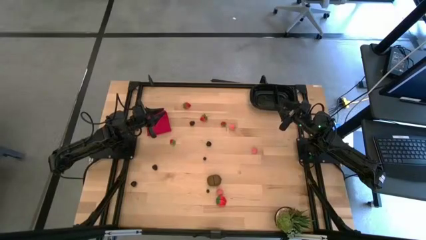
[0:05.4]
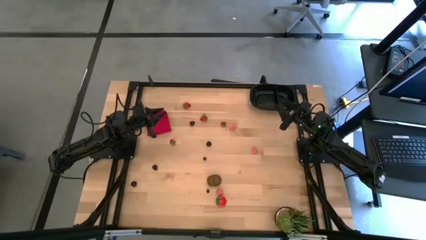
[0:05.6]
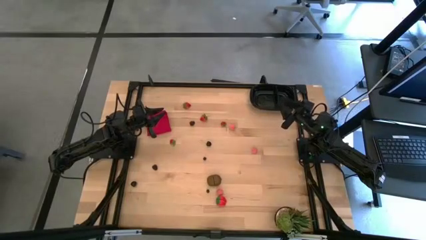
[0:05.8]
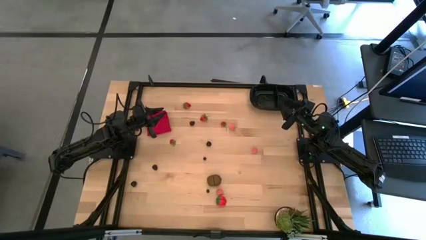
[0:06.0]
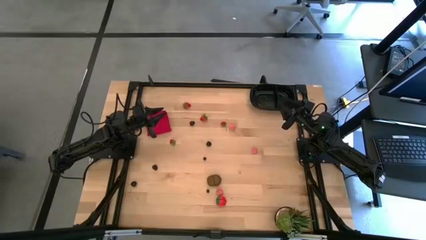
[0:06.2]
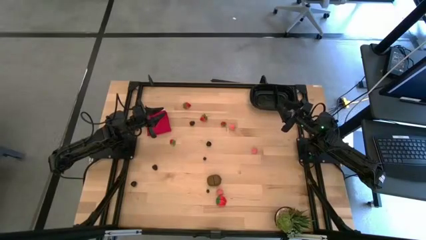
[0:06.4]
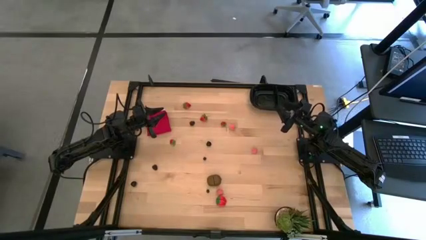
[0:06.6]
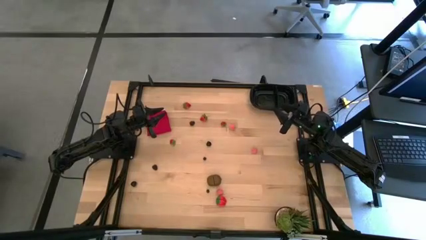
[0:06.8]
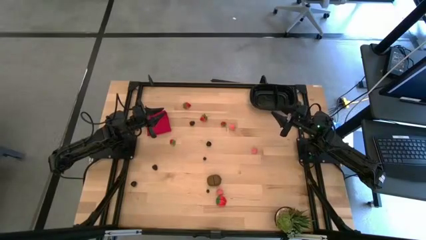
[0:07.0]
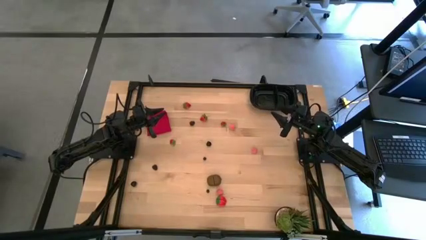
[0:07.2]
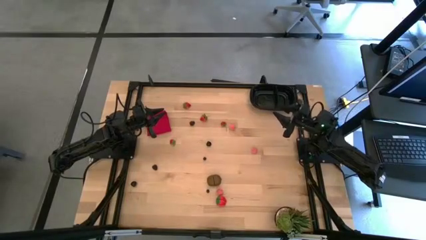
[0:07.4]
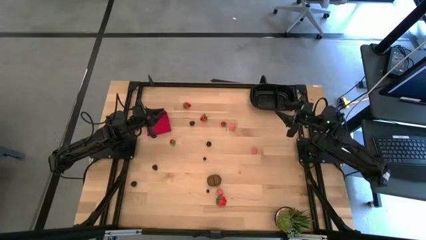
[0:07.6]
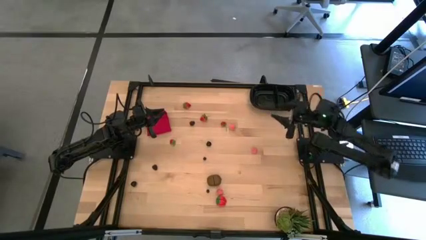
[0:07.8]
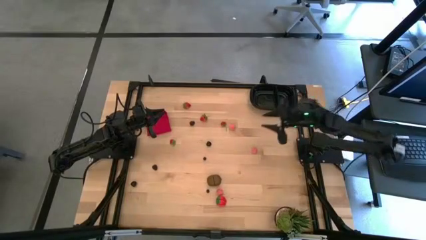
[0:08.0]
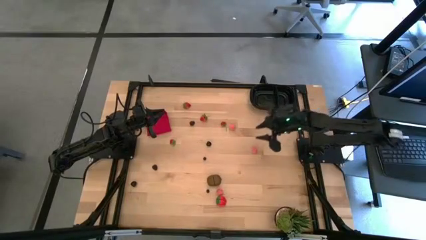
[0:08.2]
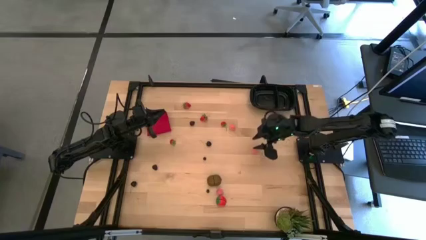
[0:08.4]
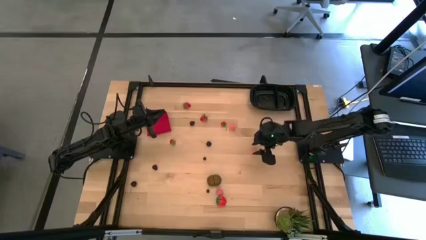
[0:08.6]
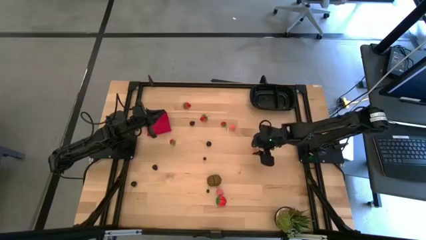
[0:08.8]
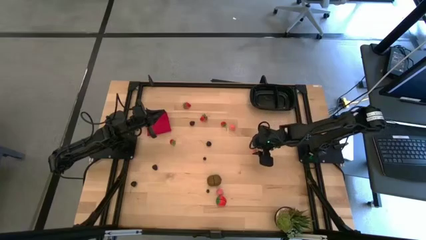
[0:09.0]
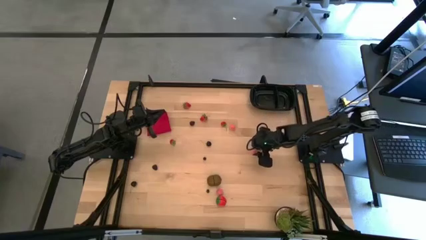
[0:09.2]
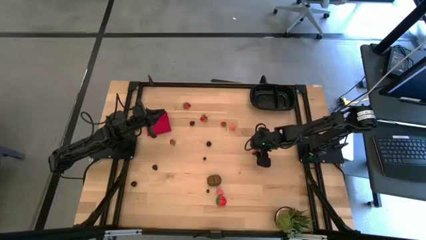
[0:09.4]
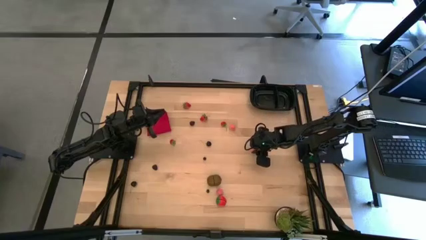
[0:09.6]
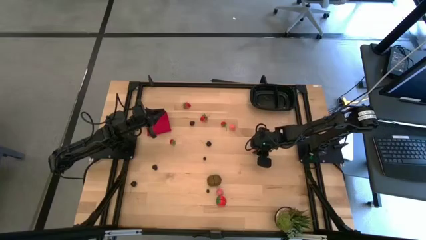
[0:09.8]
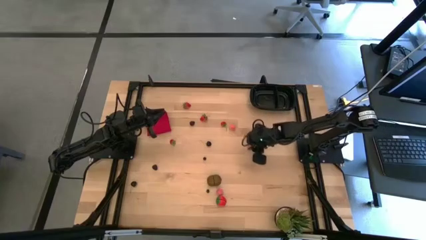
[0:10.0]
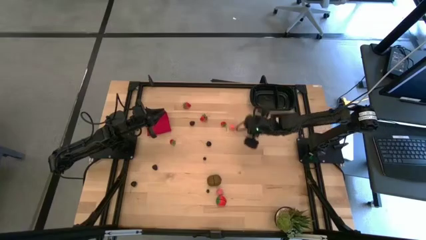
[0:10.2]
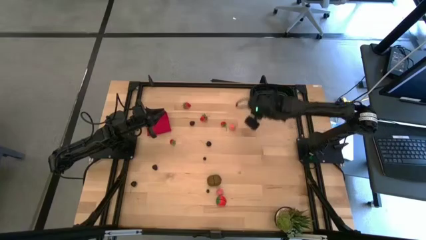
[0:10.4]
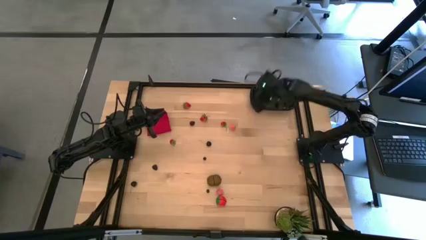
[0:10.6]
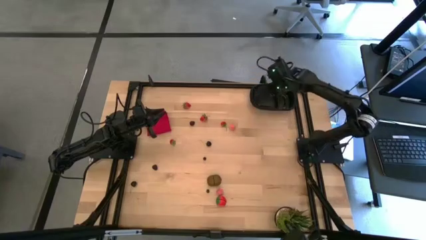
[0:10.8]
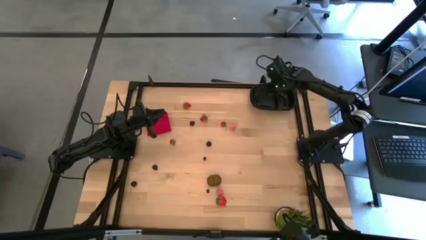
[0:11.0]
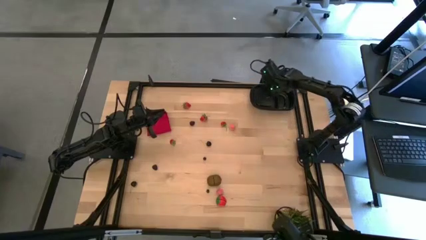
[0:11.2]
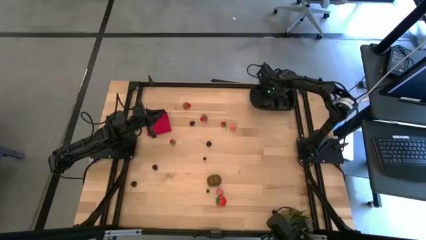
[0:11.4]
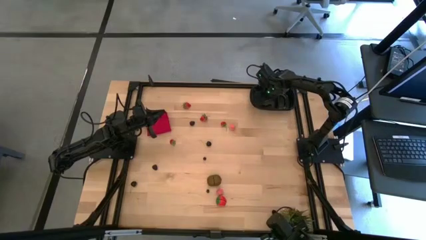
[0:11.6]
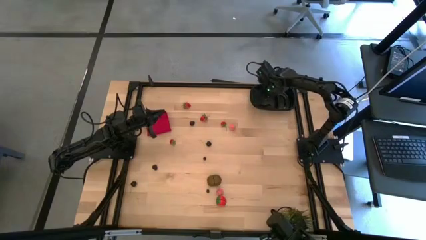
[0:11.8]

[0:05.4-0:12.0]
Task: Pick and placing Produce into tupperware
Put the bottom pink peach into the black bin

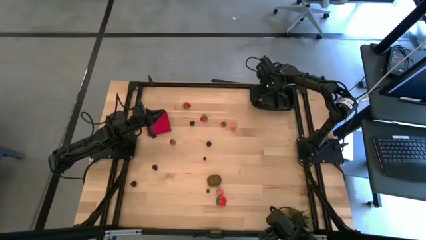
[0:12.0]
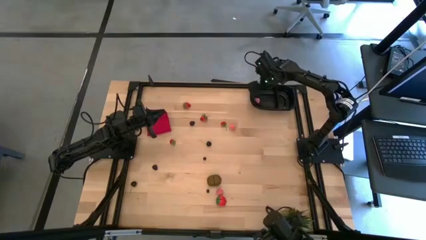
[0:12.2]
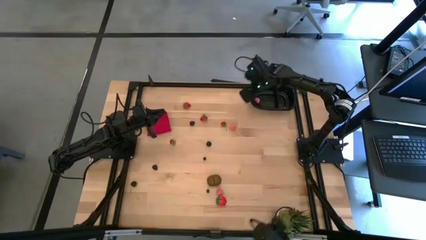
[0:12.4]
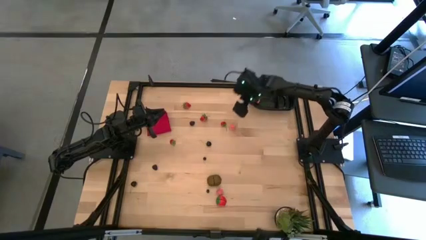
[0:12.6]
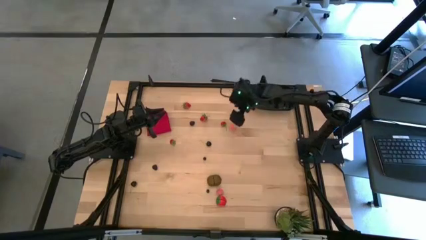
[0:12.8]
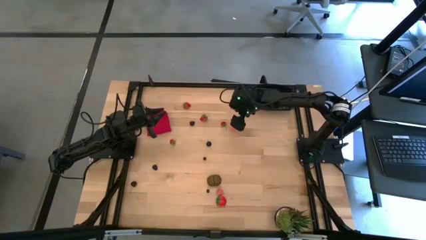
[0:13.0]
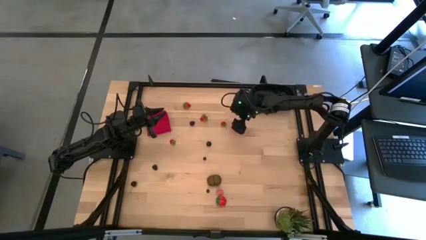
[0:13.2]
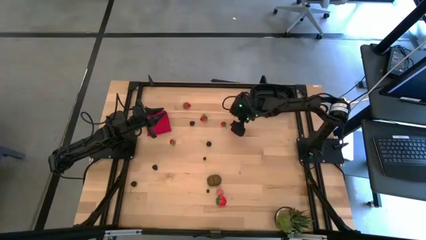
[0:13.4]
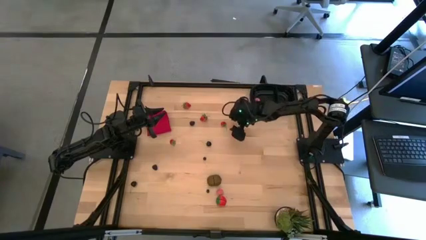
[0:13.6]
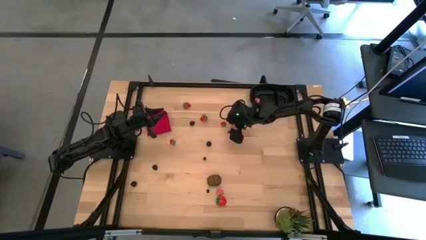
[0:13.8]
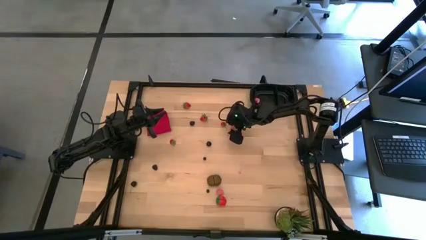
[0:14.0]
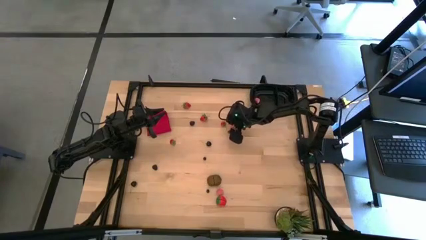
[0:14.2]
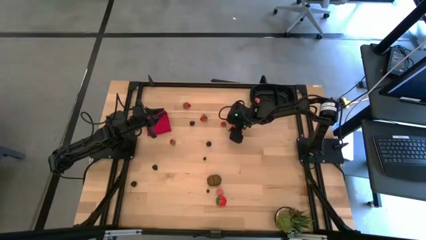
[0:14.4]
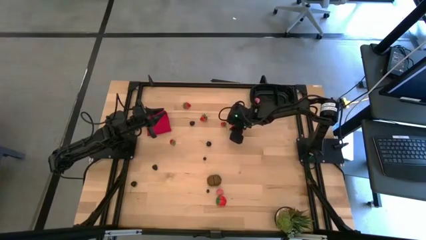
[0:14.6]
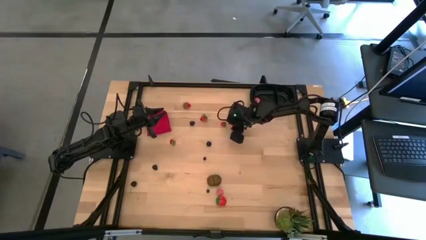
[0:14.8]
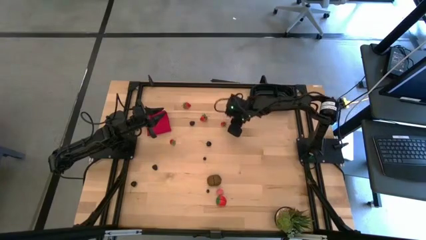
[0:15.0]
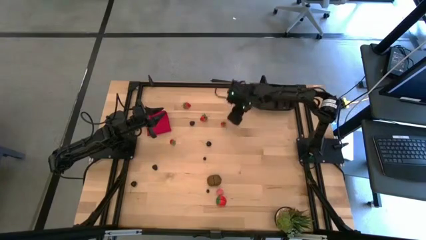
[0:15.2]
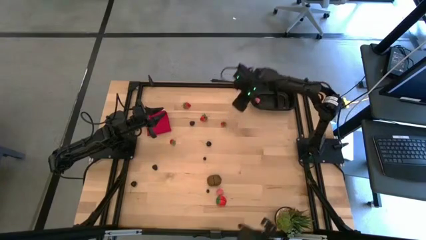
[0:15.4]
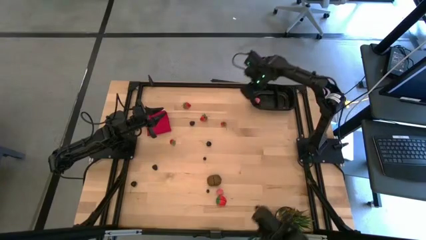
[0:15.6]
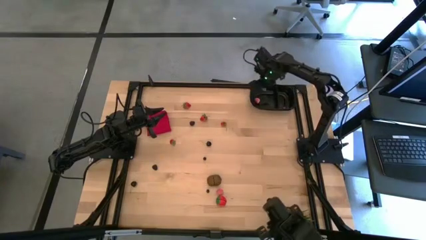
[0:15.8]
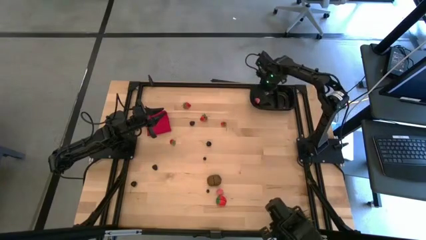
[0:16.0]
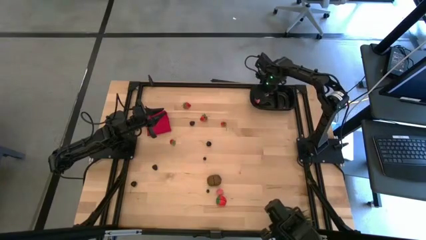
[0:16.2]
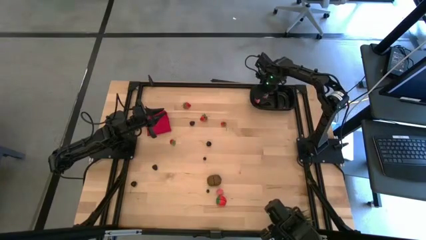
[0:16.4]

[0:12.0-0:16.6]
Put the top pink peach into the black bin

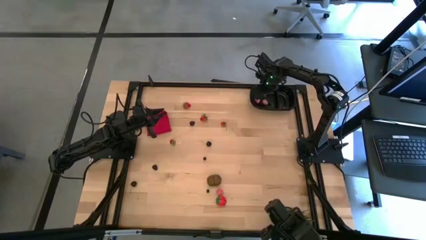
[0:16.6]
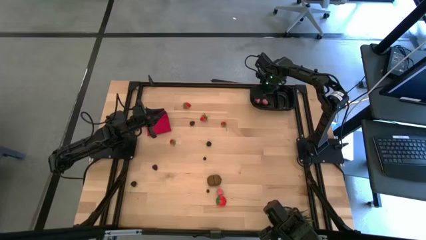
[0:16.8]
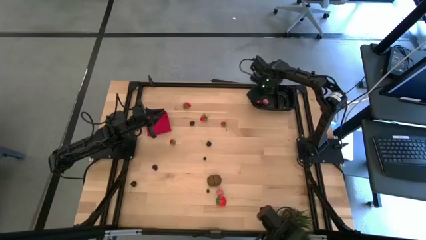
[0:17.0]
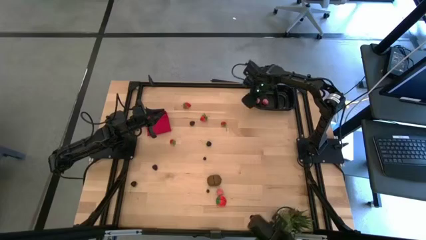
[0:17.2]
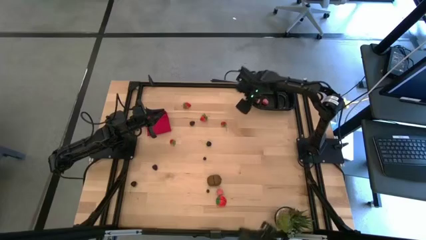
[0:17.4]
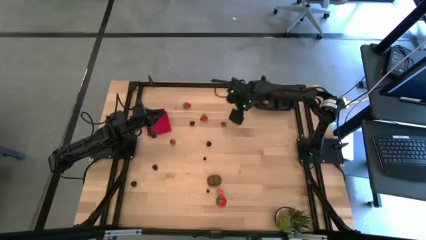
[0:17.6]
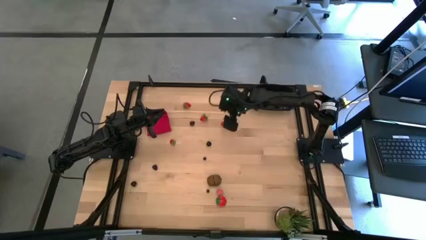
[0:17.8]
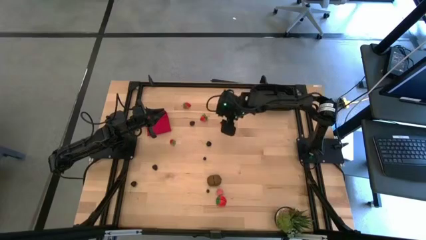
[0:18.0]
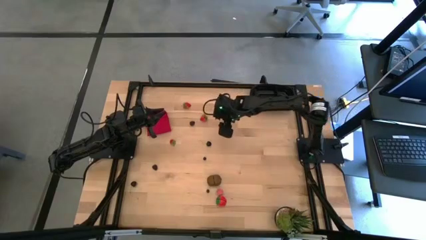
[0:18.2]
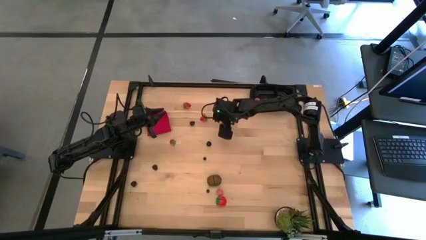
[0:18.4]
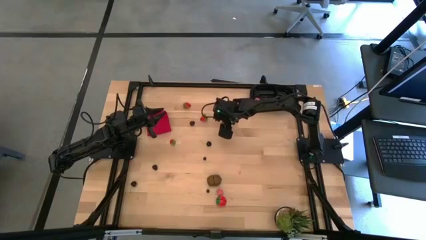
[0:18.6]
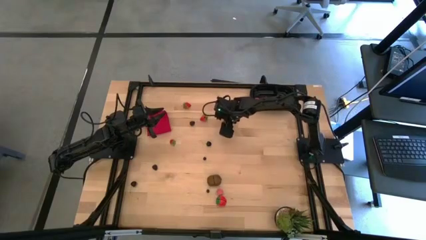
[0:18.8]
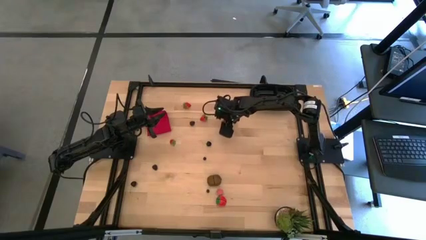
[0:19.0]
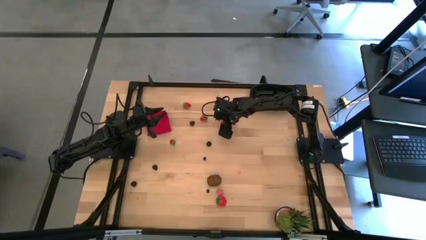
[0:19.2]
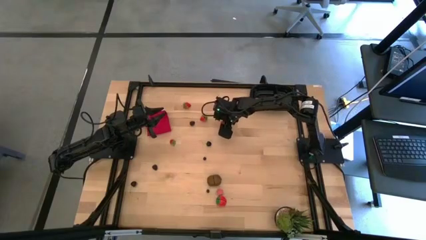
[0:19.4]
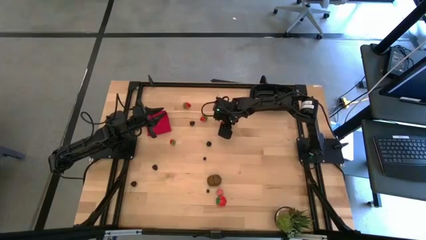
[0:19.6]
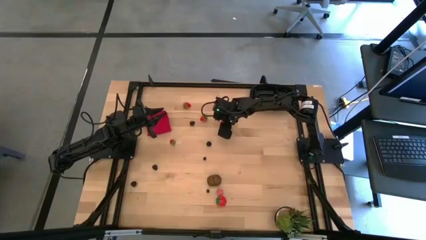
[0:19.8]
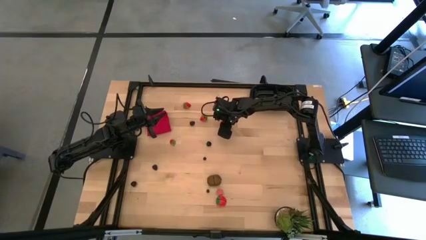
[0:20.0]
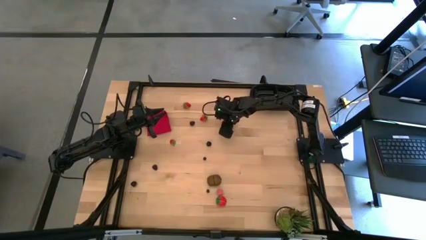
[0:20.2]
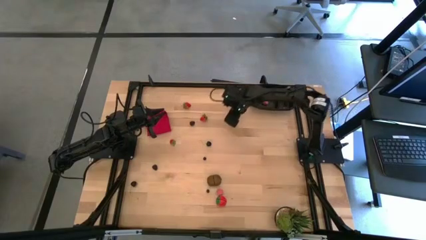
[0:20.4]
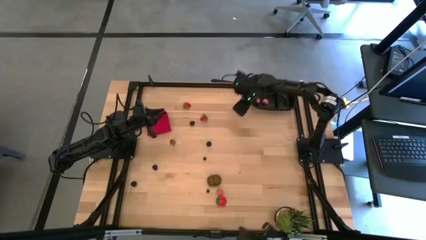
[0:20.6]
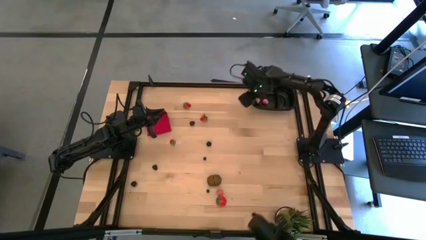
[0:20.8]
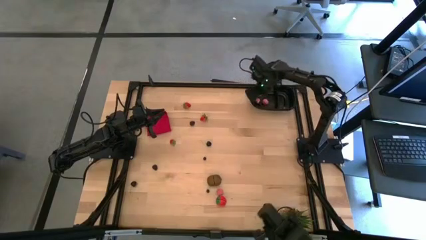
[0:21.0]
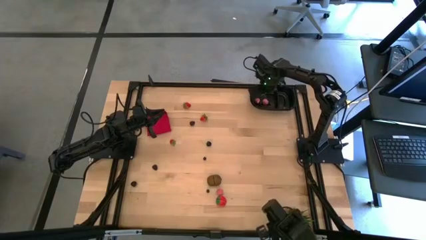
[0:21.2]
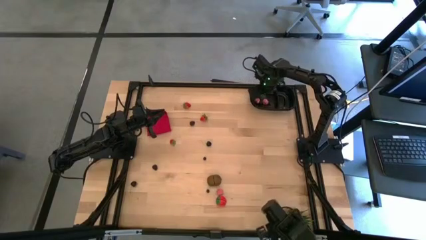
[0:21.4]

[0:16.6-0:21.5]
Put the red cherry into the black bin

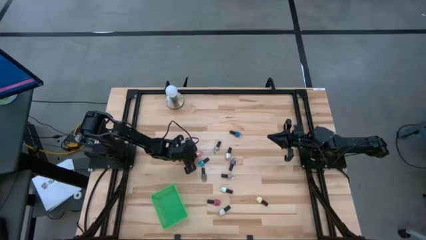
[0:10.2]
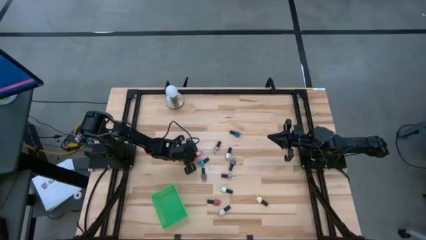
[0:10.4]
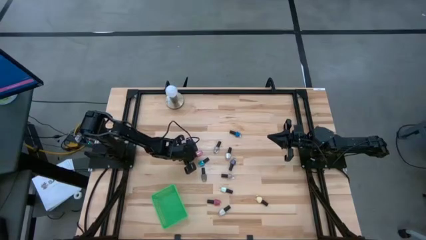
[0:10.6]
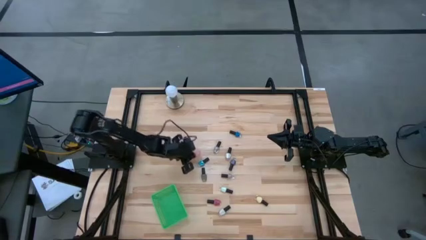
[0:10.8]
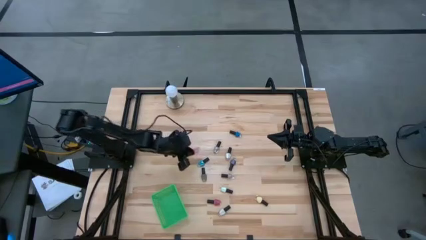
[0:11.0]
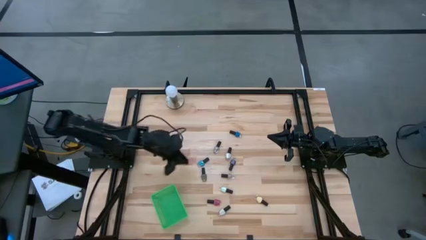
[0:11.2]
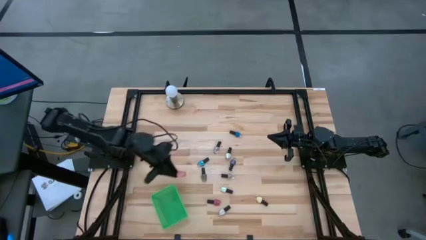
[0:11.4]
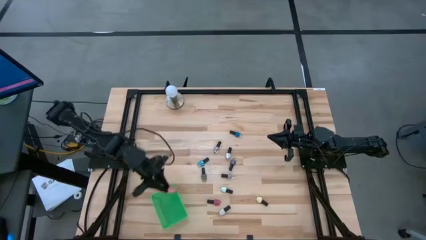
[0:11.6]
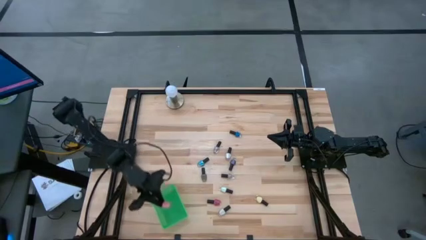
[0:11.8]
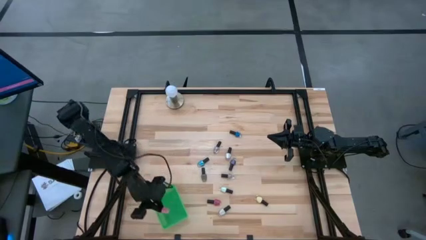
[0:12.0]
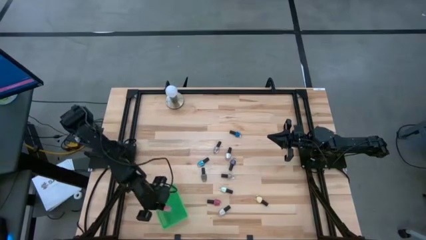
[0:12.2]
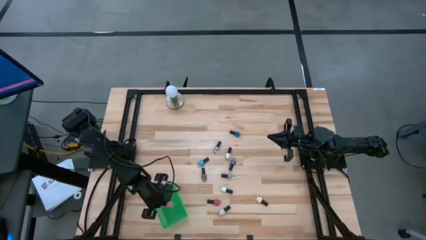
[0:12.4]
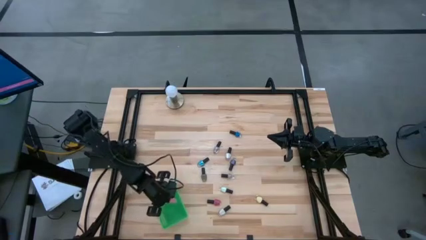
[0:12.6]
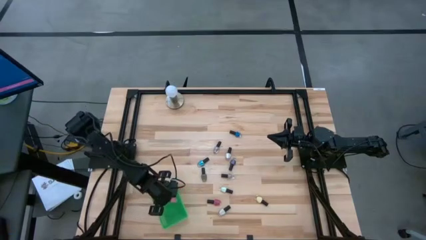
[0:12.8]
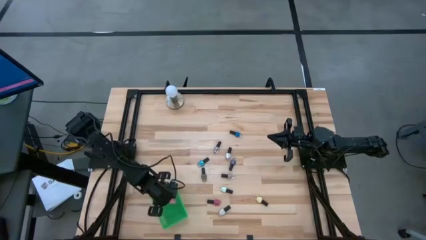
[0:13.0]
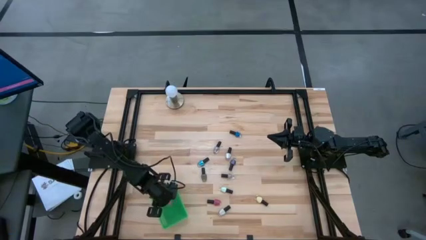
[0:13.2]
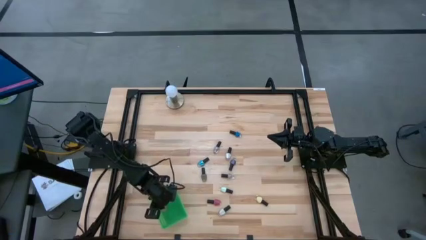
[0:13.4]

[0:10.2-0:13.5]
Task: Pick & Place Nail Polish
Put the black pink nail polish bottle into the green basket
